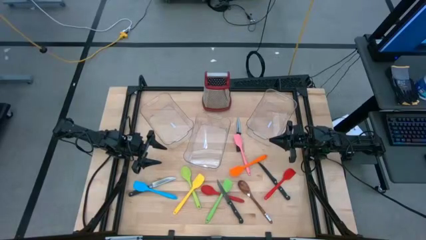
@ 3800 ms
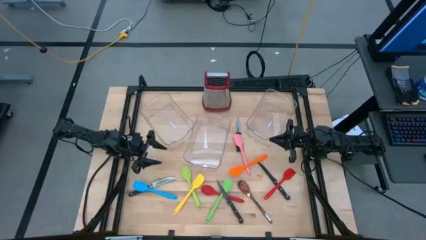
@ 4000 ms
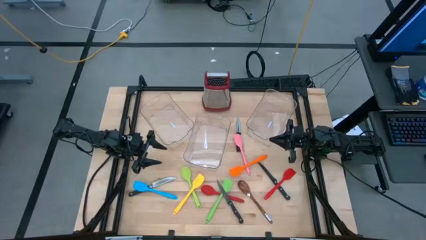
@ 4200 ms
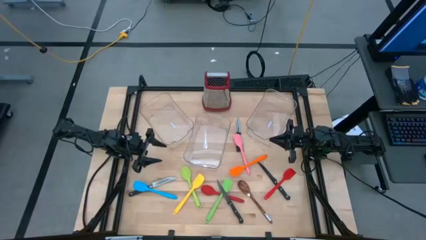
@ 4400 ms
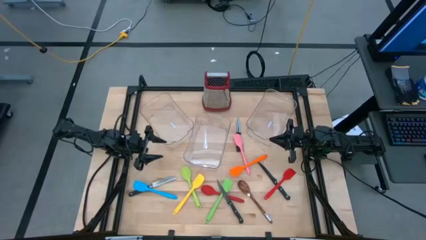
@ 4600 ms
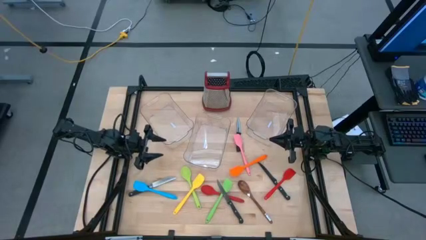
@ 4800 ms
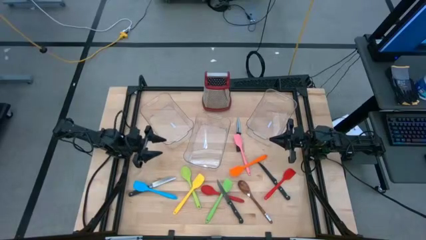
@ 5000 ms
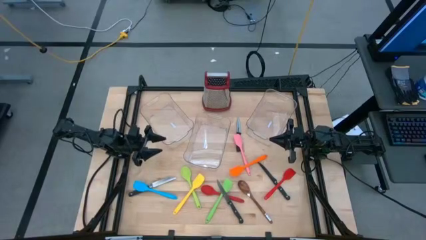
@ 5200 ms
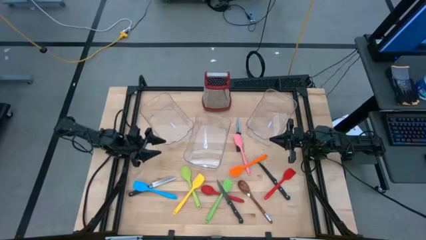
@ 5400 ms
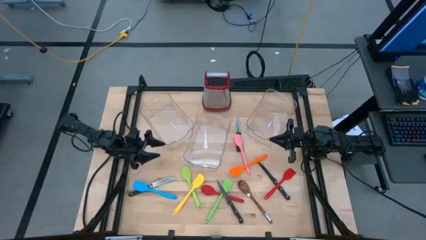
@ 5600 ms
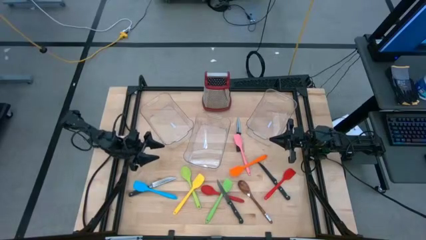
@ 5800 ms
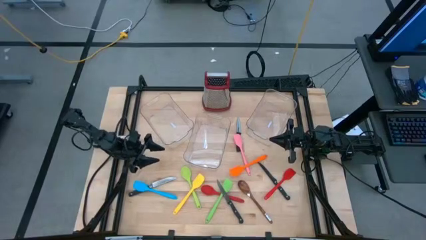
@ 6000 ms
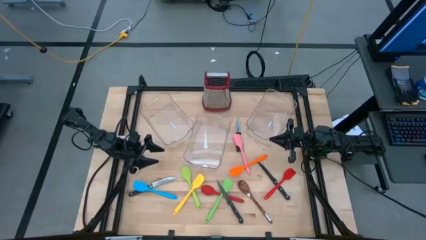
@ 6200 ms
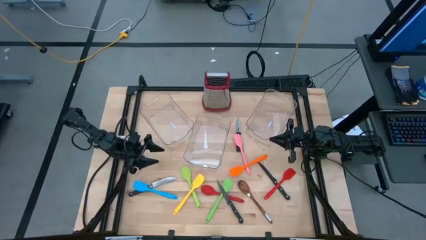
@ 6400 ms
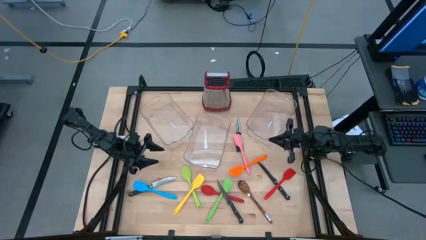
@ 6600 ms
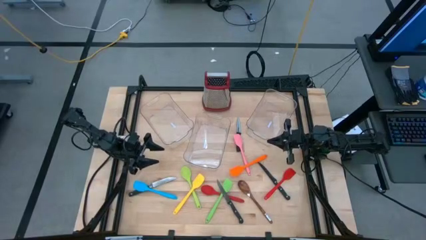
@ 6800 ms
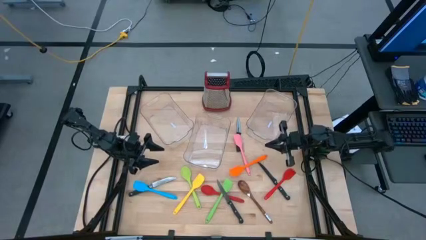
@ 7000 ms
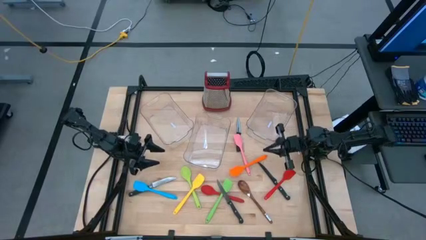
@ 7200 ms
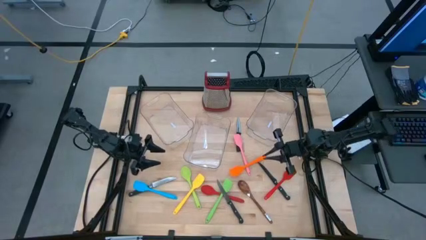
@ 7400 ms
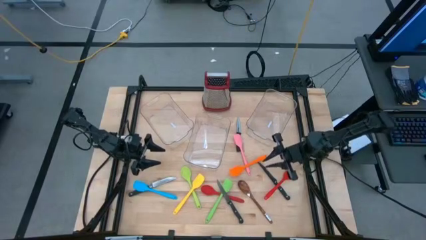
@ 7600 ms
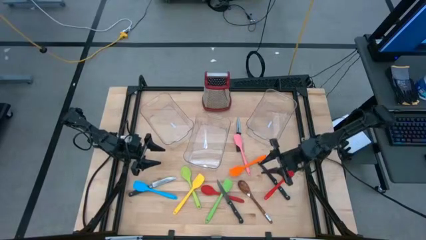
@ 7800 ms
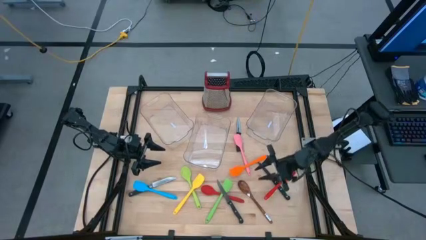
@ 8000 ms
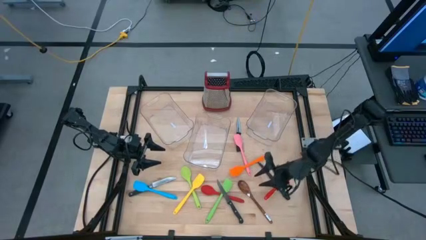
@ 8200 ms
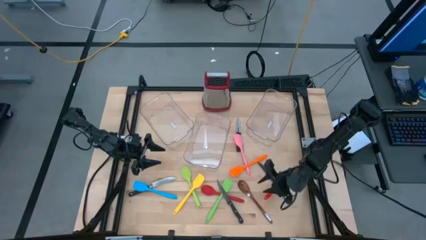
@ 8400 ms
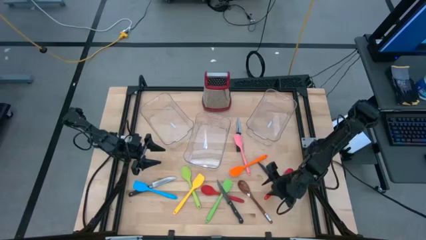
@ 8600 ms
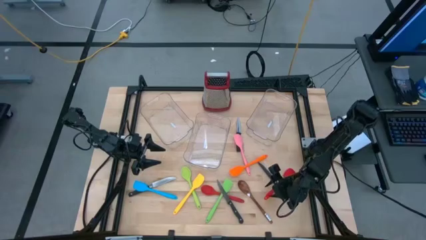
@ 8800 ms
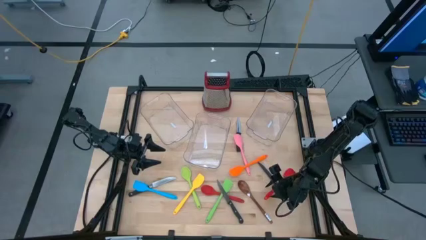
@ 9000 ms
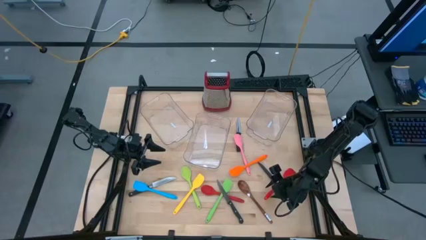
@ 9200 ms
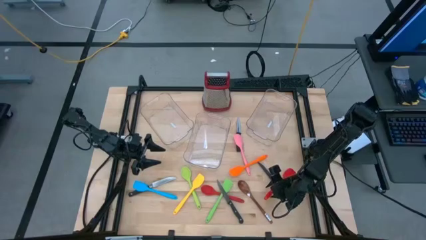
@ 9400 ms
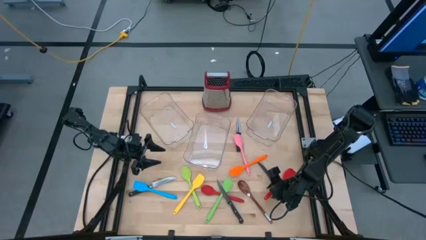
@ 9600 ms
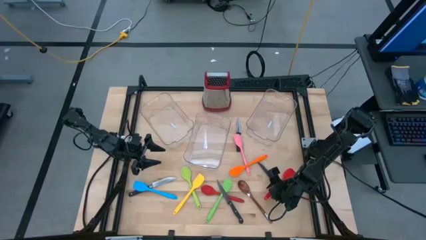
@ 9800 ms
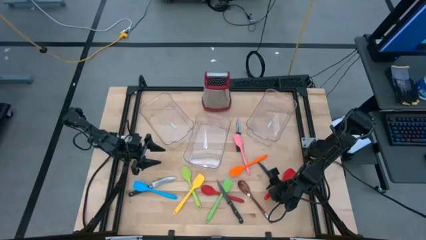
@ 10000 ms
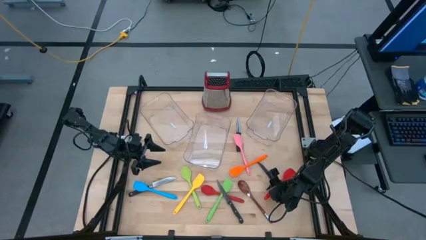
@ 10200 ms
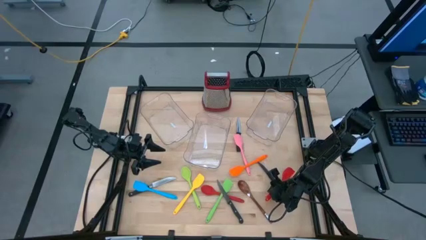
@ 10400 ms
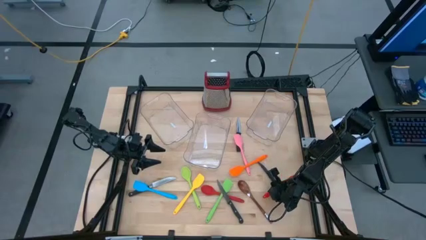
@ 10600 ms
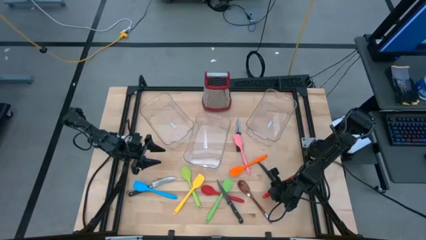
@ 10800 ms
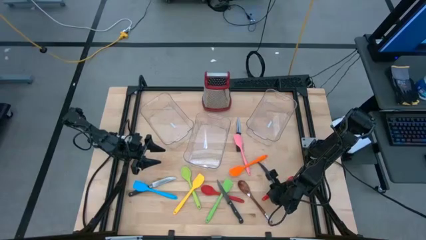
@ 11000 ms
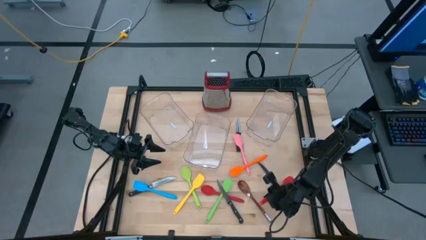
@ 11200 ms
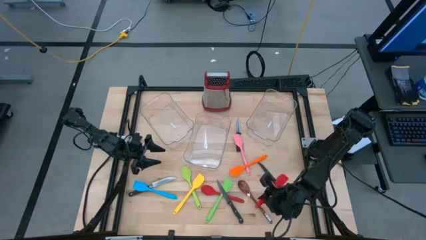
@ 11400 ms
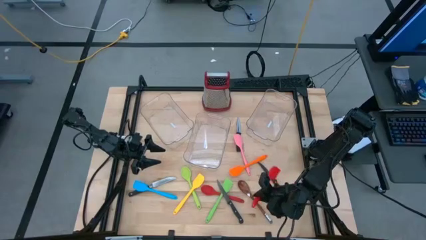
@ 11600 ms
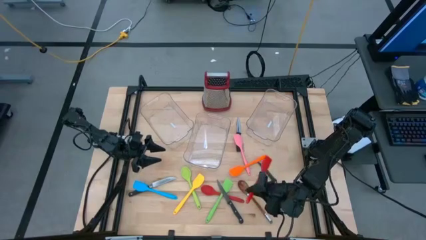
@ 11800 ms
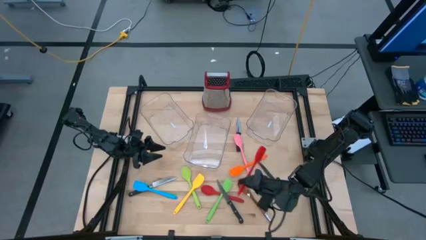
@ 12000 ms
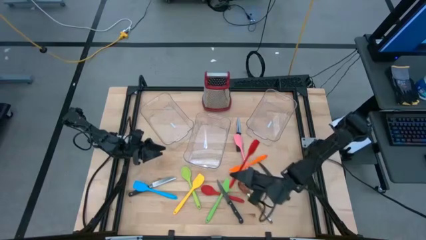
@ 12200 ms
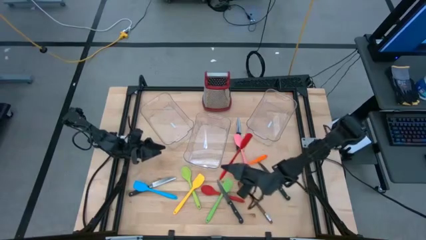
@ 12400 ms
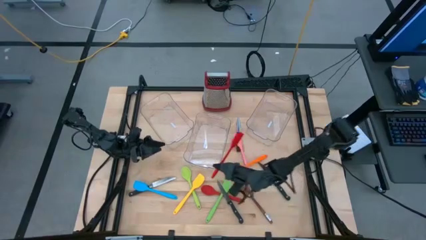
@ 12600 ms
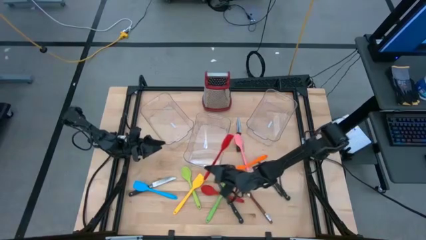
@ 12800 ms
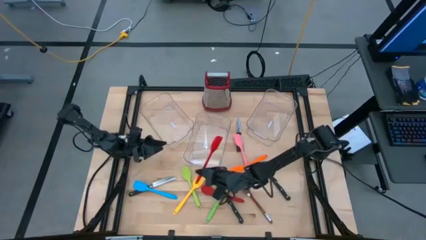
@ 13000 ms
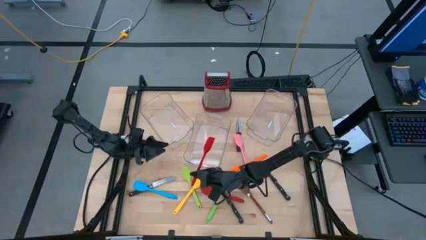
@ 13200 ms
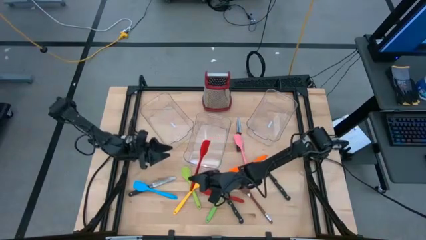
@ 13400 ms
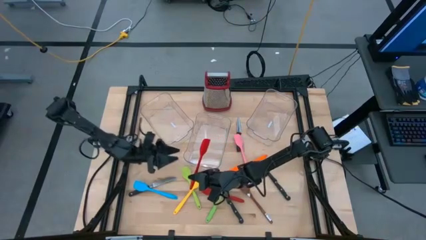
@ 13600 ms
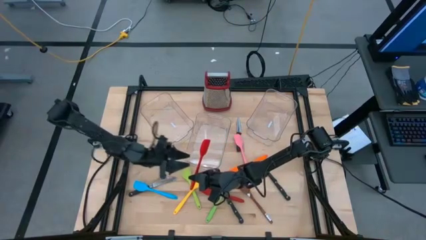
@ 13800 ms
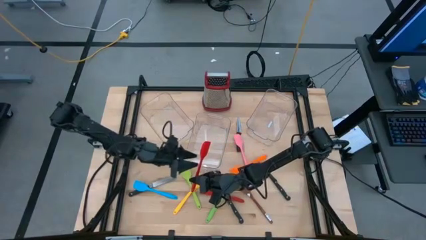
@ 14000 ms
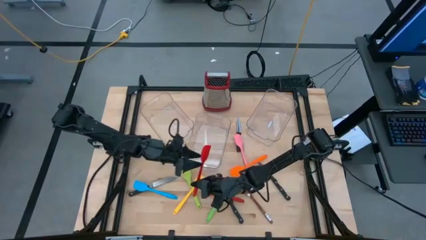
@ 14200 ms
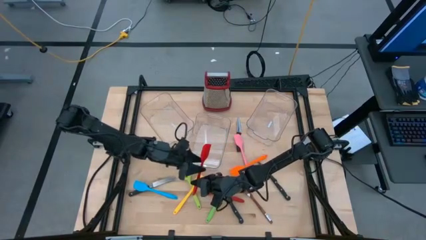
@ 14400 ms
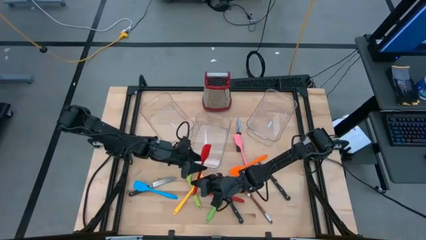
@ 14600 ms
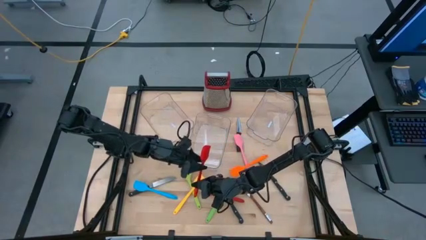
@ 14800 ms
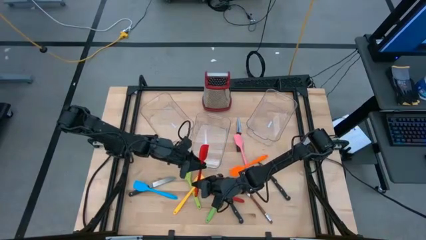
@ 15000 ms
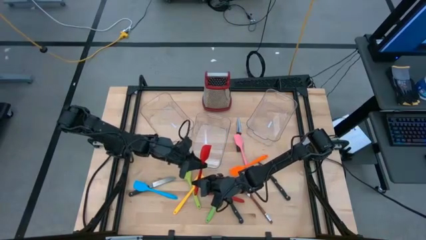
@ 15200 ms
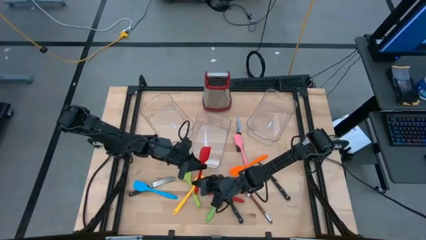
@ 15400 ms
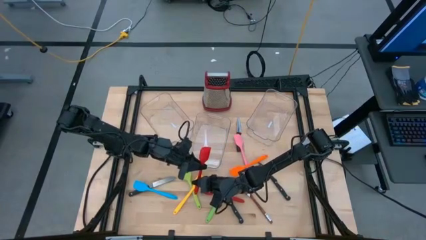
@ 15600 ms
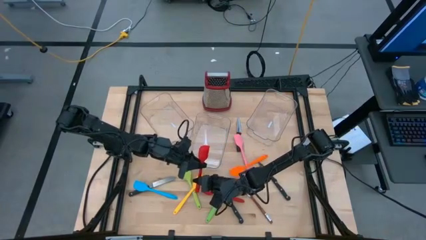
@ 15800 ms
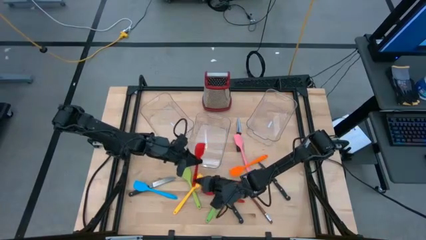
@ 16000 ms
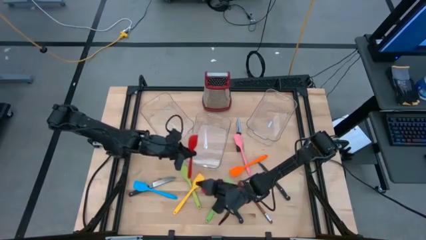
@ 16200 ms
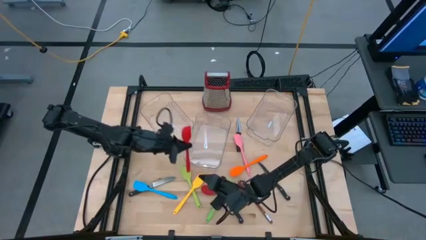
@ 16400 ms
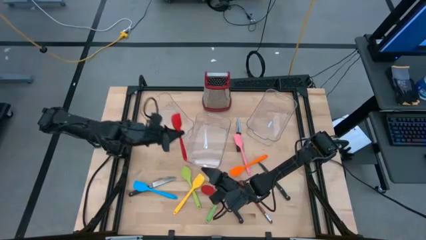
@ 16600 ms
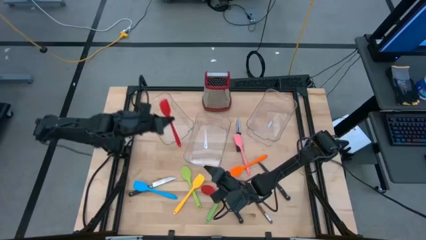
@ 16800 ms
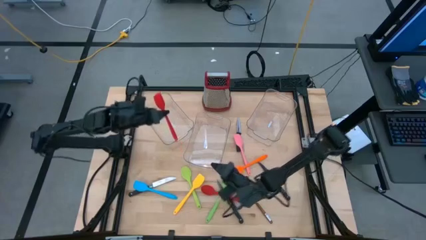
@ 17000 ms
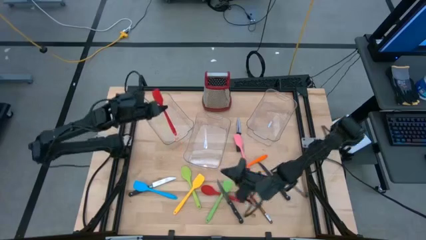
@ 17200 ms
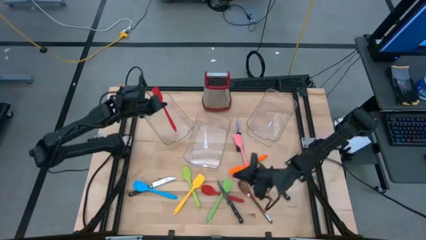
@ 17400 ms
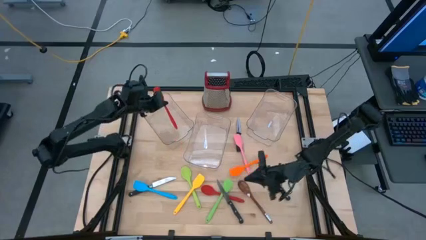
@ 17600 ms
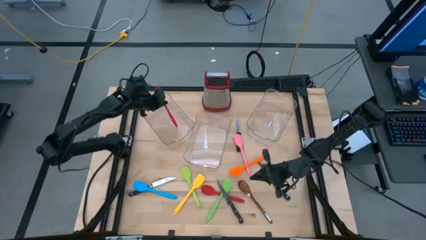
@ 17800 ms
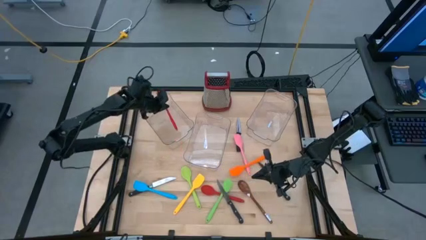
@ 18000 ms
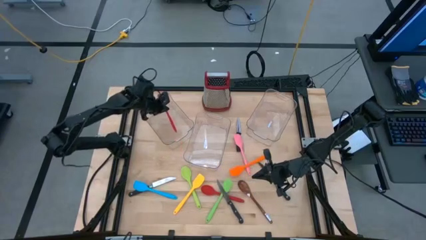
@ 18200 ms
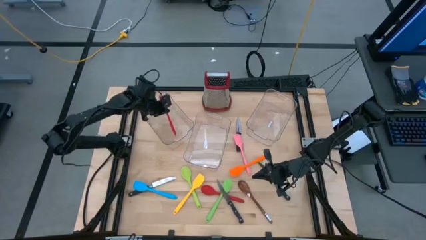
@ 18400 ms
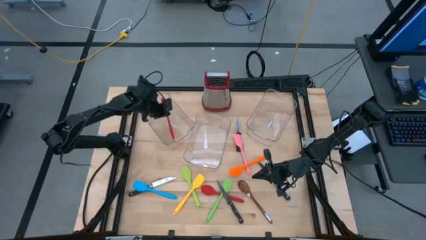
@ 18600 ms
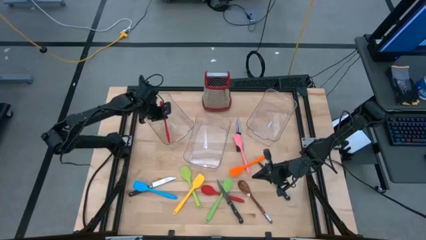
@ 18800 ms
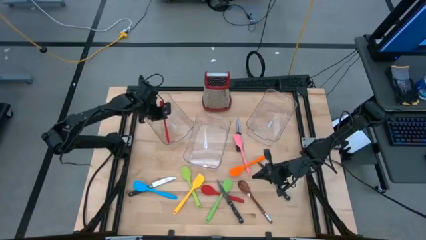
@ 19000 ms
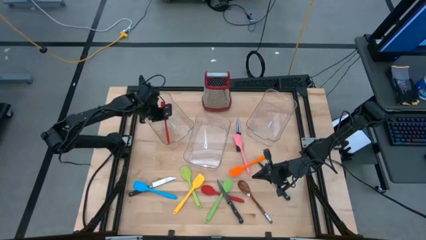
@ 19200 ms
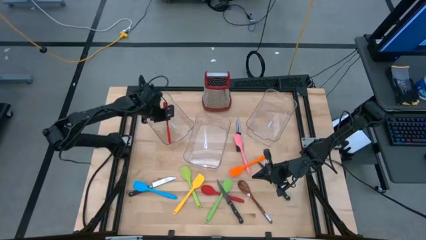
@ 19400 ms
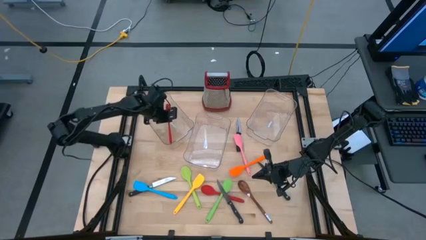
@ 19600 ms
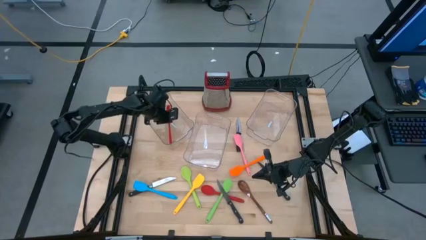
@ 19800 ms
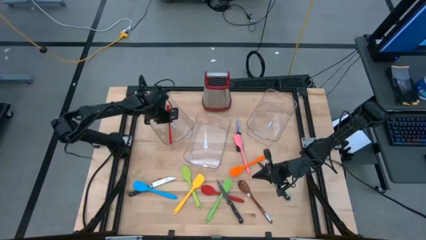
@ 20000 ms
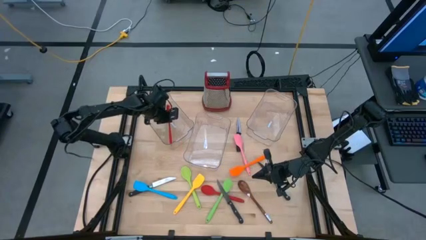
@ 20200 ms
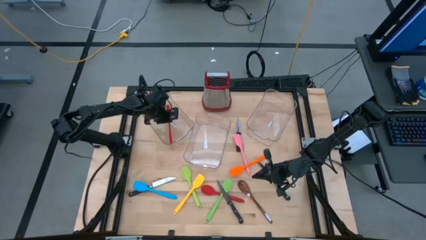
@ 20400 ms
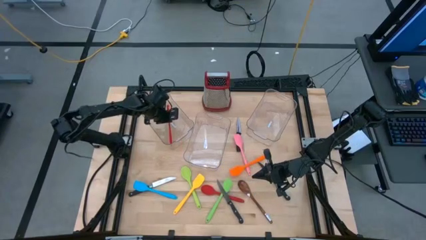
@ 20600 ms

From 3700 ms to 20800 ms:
Task: Pick & Place Kitchen Items
Put the red spatula into the left transparent bin
